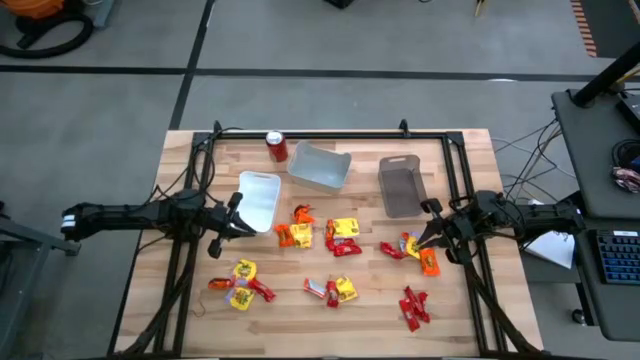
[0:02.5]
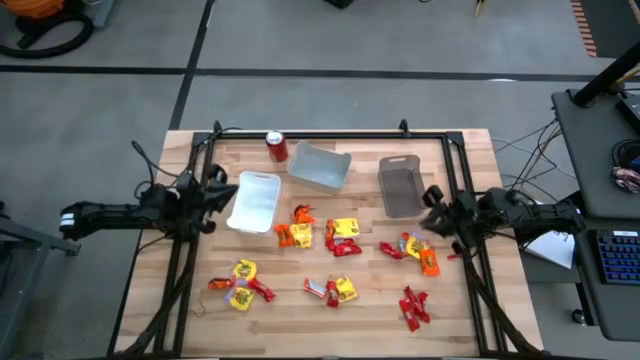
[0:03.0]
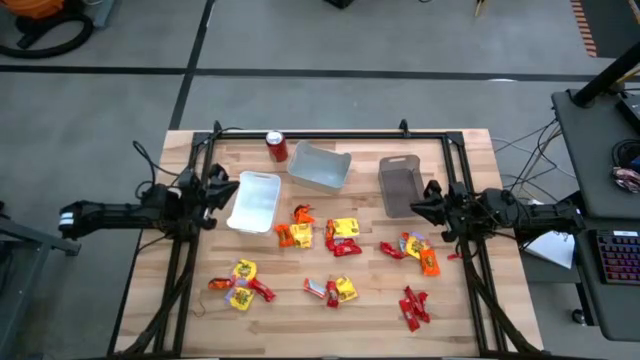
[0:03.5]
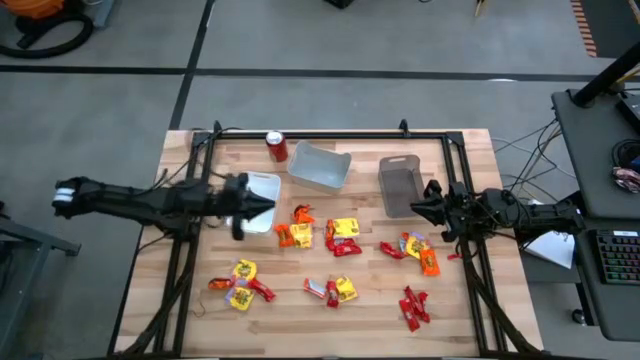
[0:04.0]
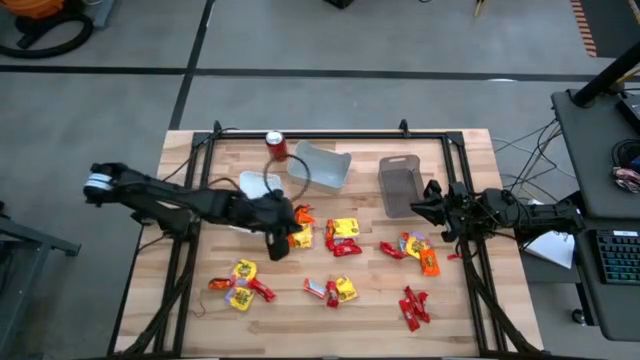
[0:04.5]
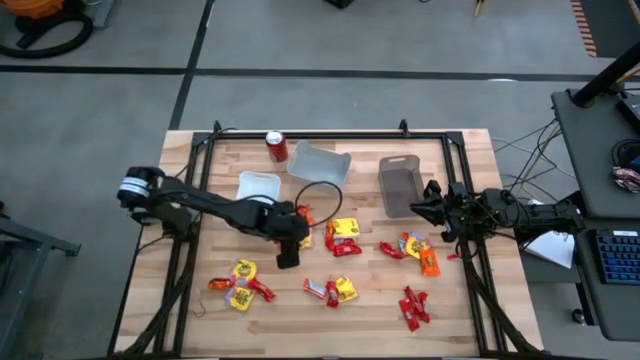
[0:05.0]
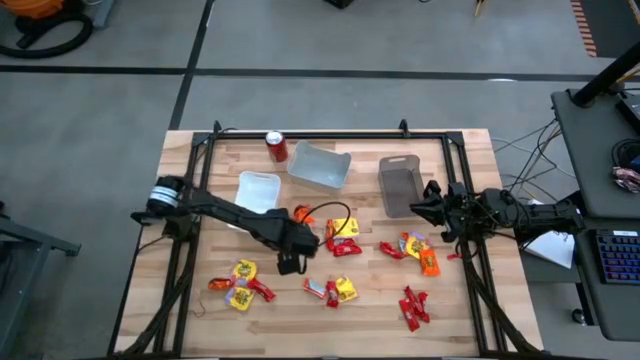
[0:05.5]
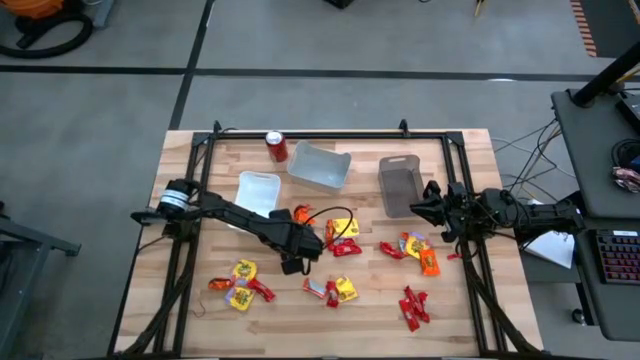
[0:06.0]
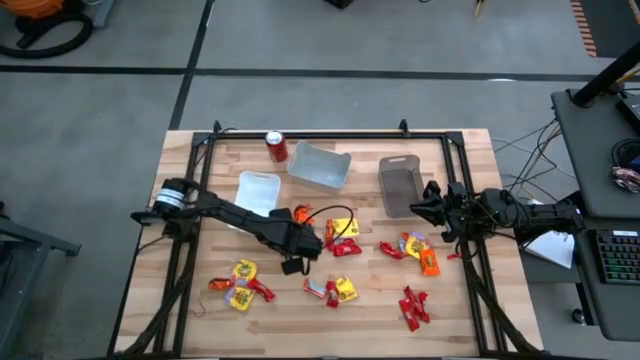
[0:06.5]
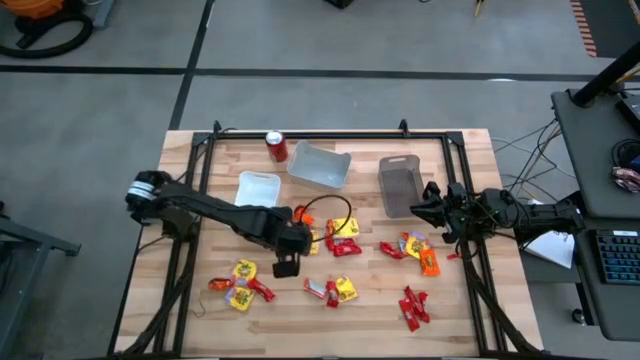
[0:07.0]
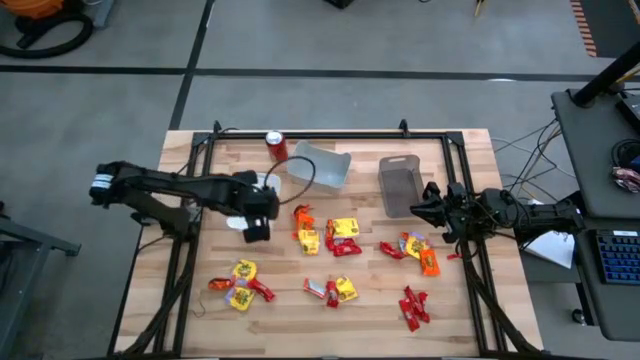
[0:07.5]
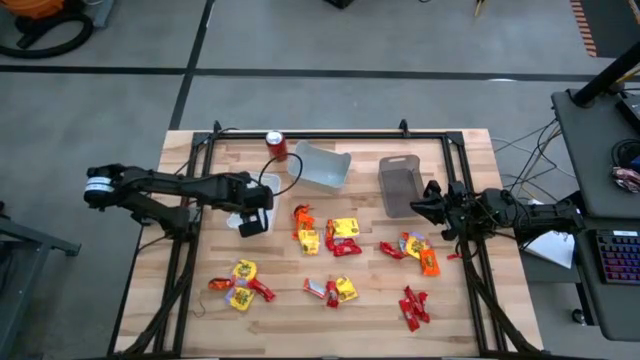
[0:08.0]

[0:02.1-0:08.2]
Task: Sort candy
Put the orange chocolate into the white bin

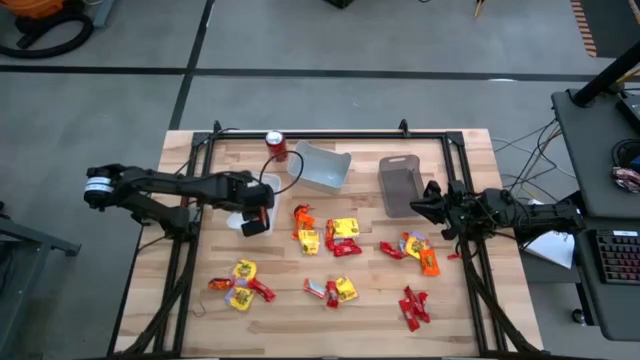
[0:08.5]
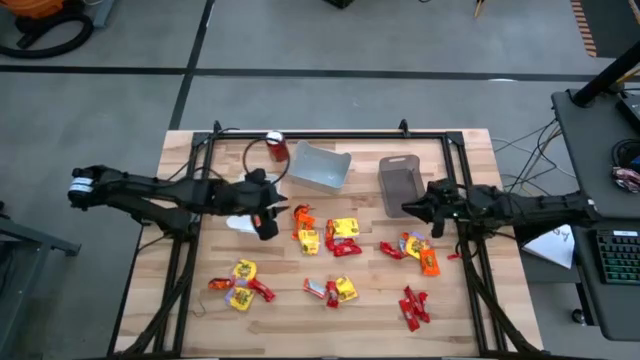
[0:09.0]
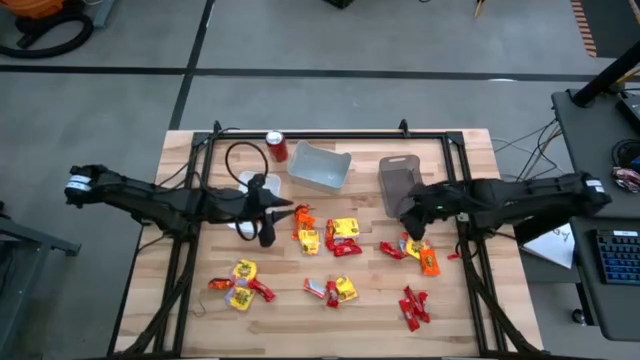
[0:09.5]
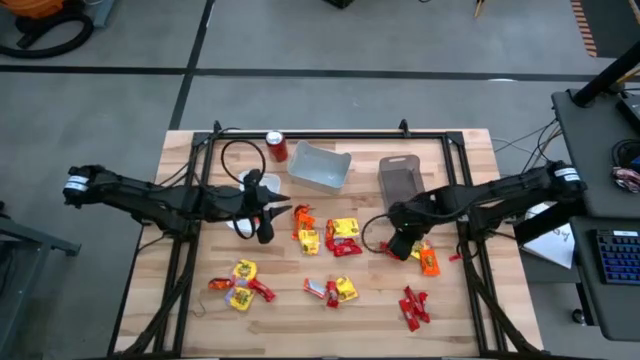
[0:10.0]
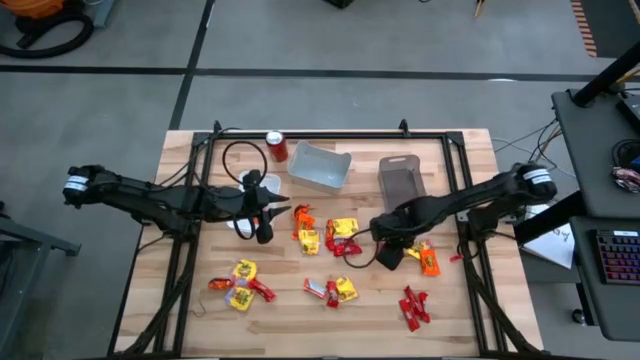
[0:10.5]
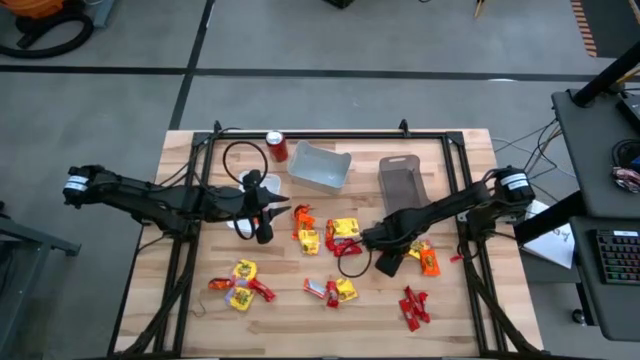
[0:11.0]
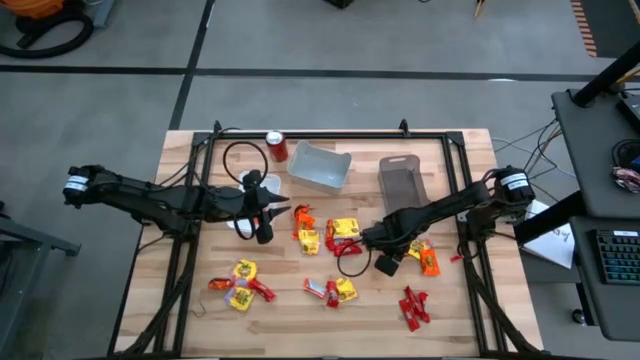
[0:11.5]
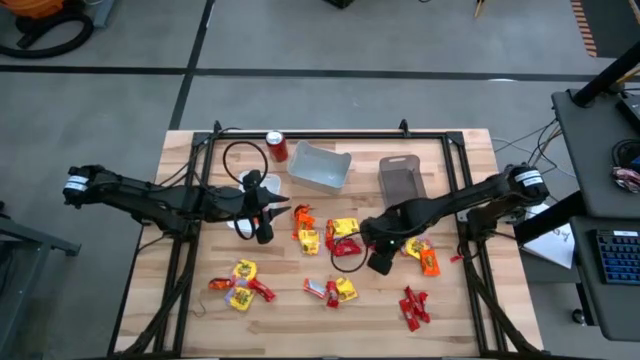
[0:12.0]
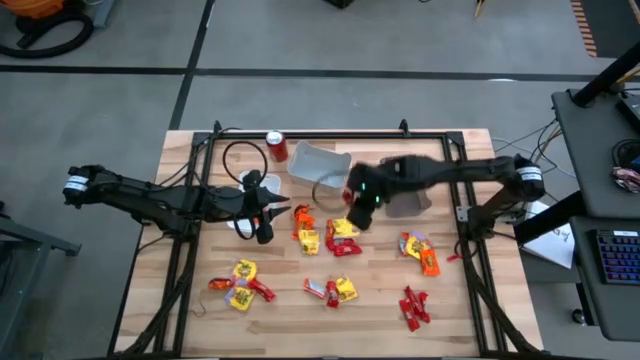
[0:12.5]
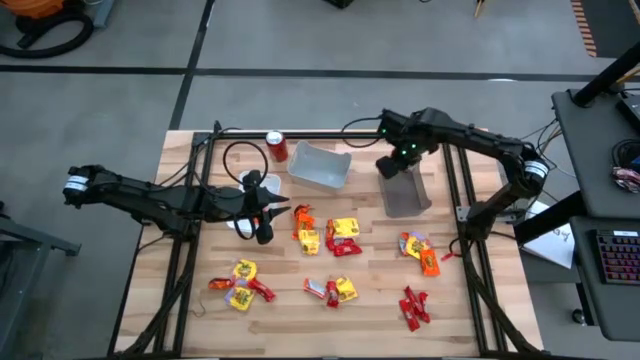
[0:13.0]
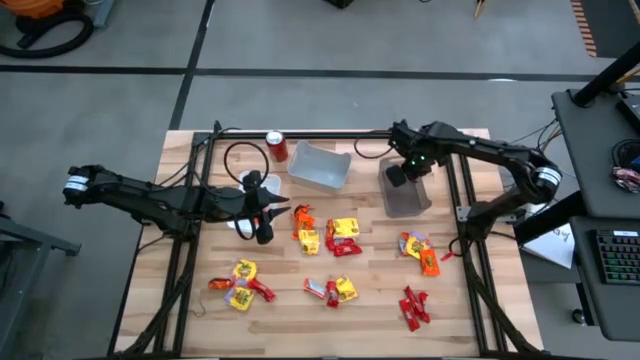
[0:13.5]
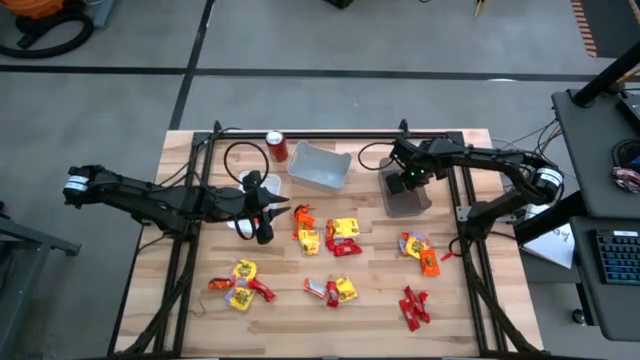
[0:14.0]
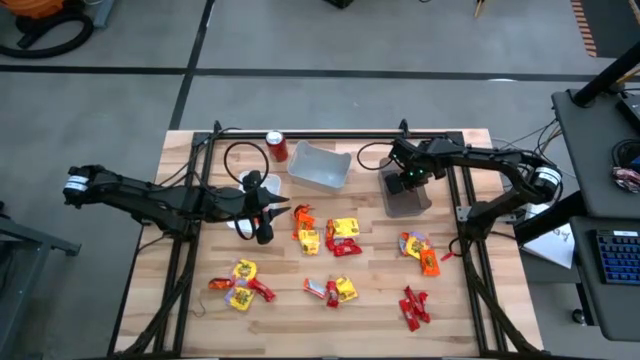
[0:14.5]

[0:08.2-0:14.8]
Put the red chocolate into the black bin

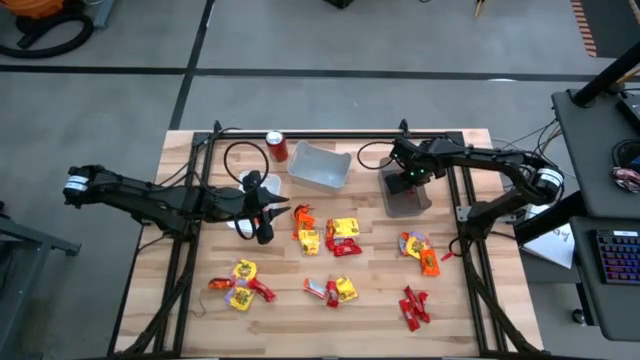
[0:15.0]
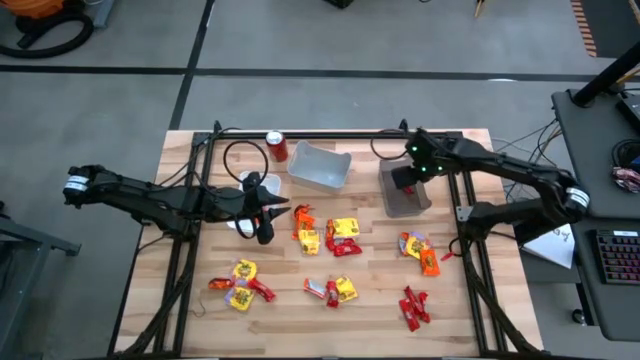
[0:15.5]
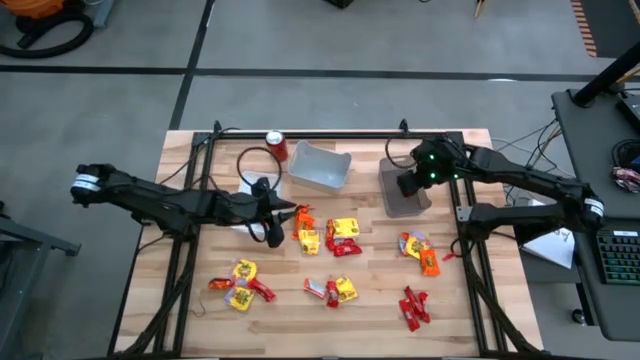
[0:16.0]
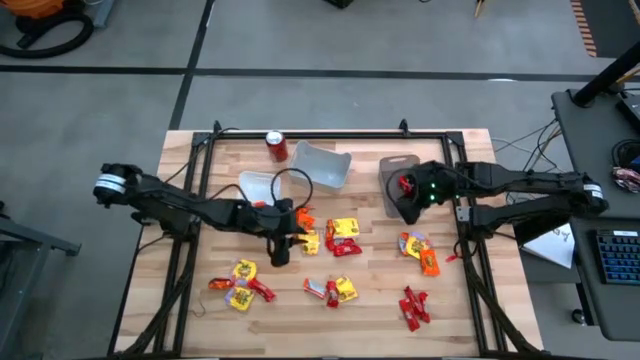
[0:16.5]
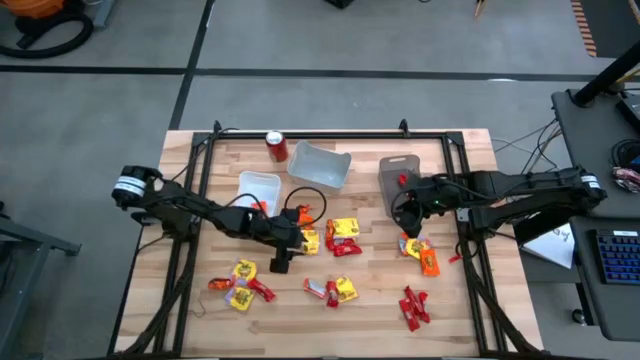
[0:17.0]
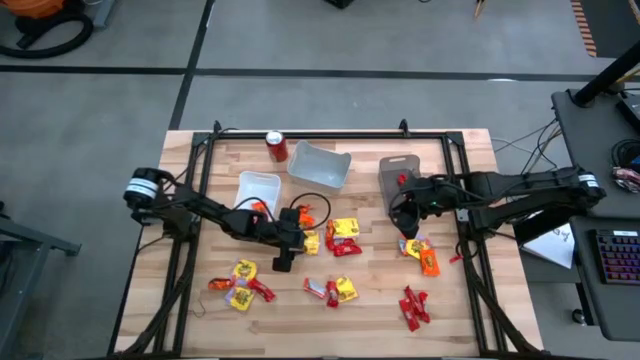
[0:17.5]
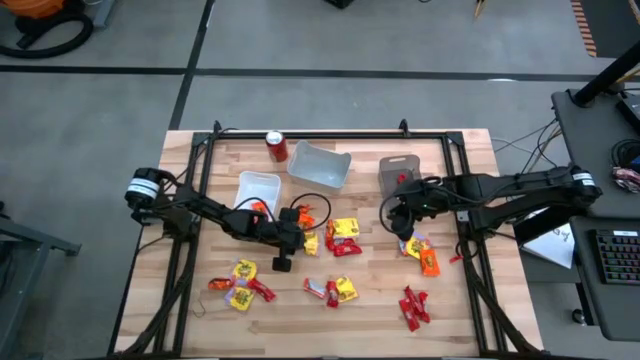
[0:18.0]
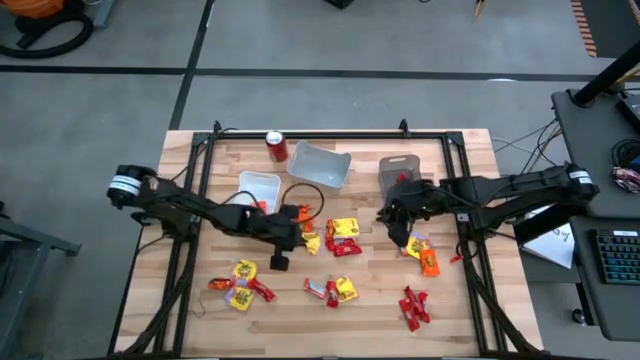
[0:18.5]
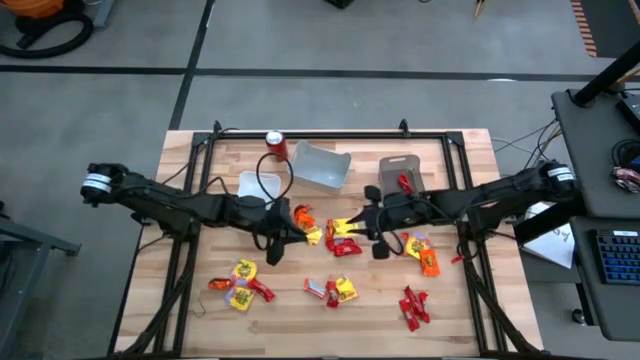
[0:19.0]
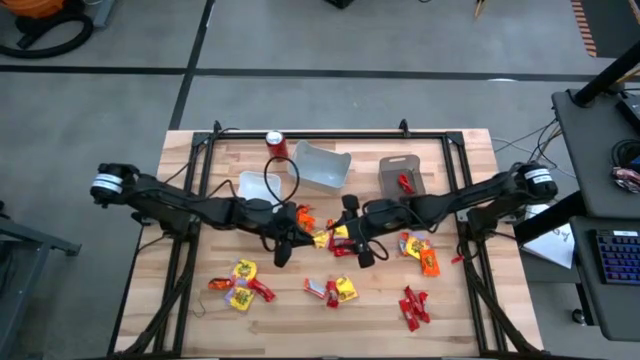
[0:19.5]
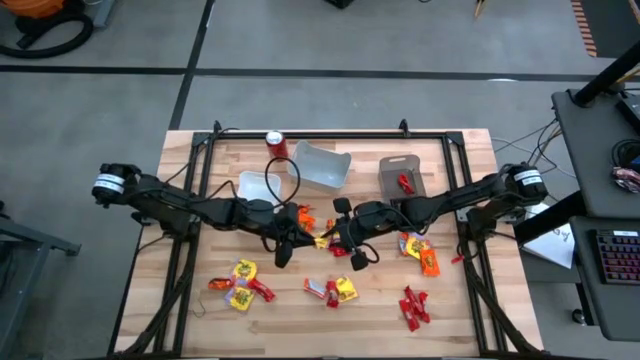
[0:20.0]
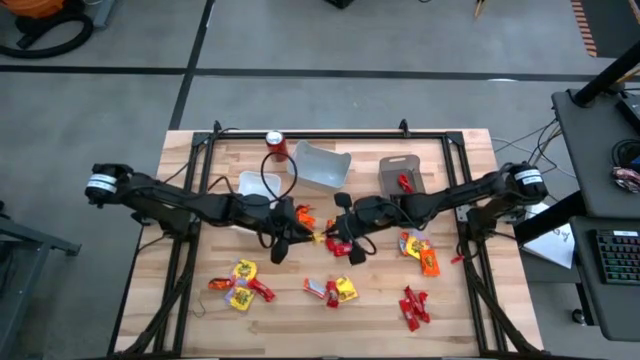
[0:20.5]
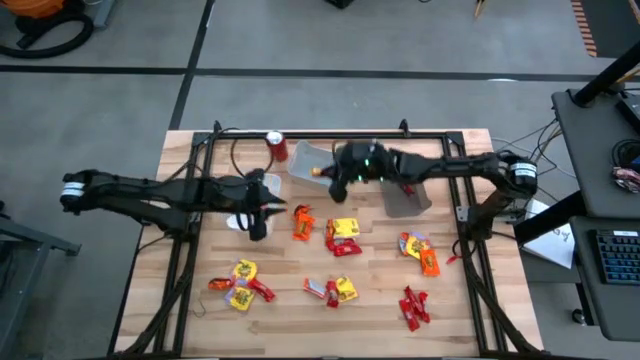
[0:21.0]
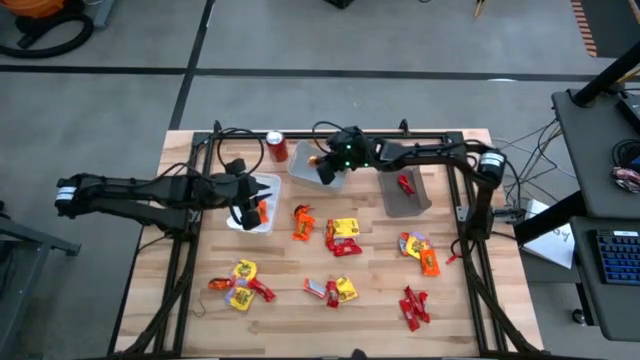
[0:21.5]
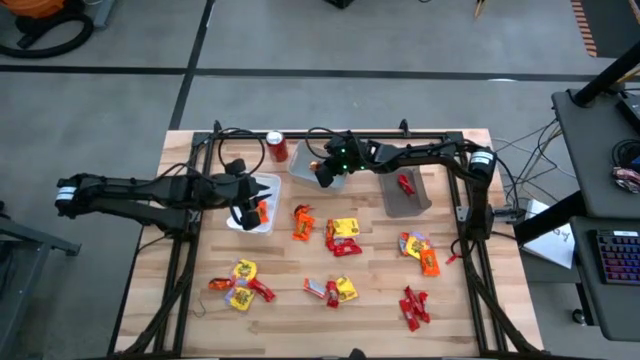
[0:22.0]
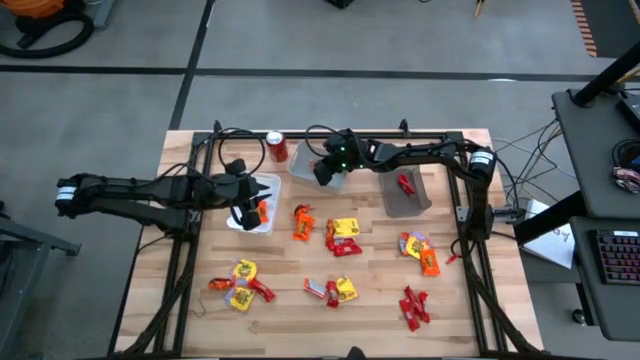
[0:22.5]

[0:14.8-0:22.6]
Put the yellow candy into the gray bin
